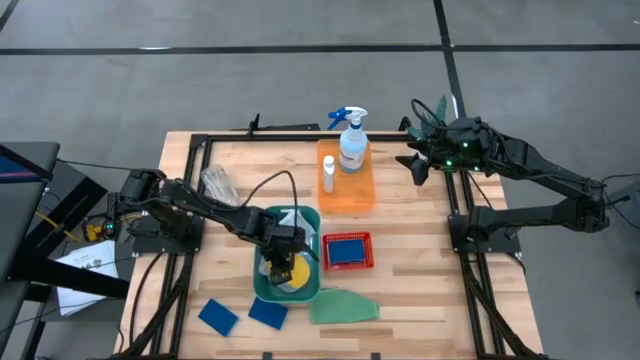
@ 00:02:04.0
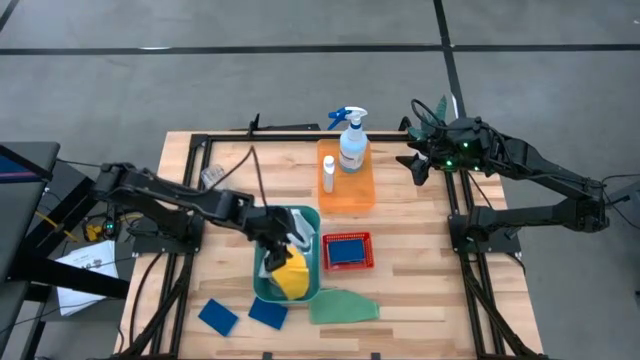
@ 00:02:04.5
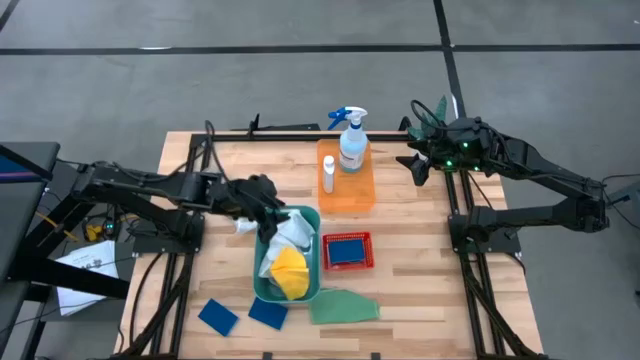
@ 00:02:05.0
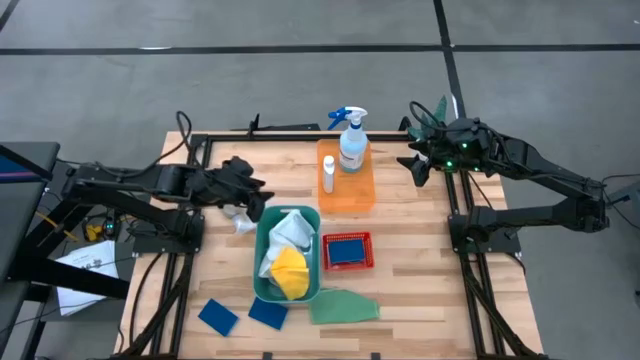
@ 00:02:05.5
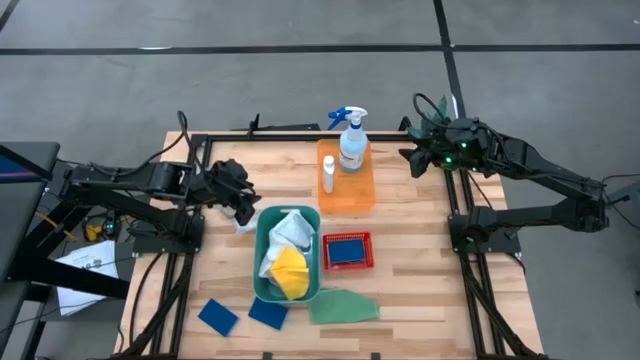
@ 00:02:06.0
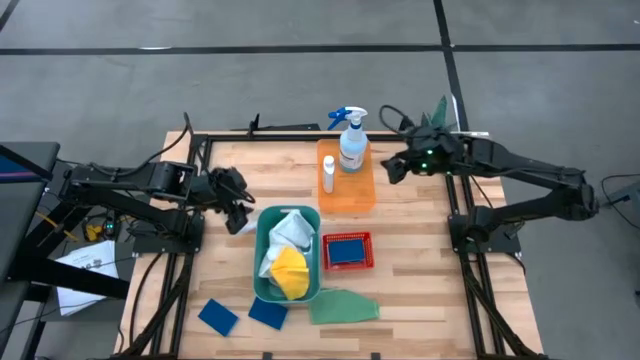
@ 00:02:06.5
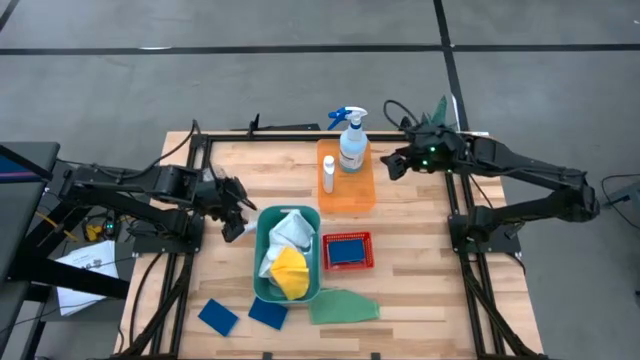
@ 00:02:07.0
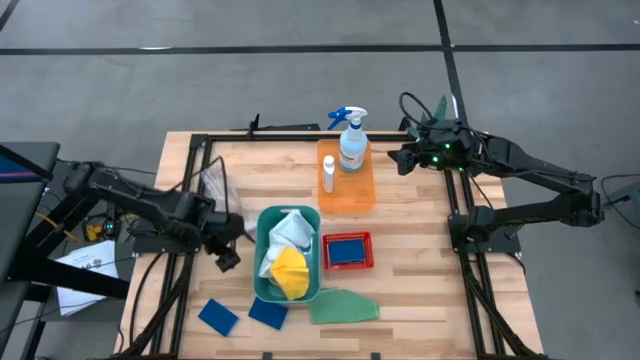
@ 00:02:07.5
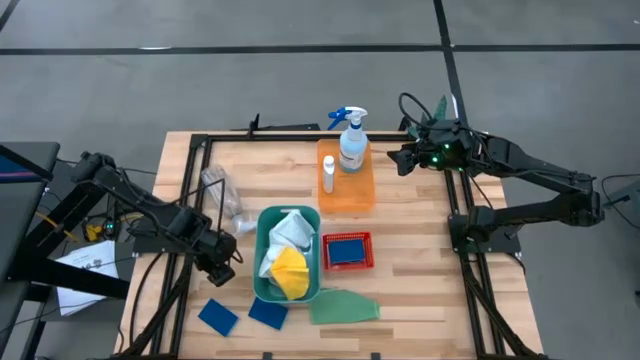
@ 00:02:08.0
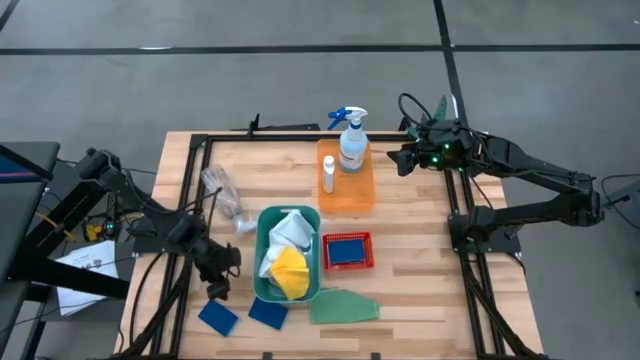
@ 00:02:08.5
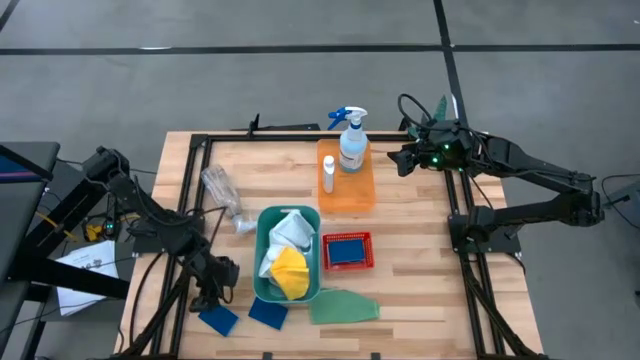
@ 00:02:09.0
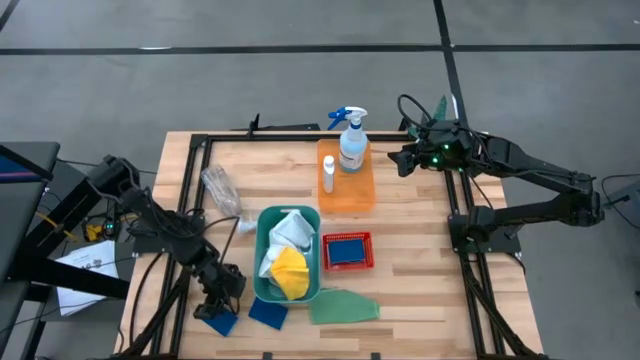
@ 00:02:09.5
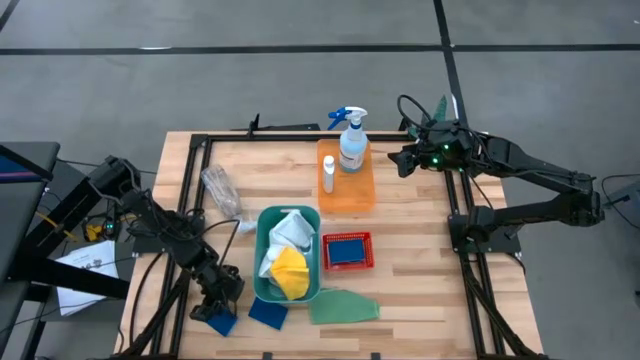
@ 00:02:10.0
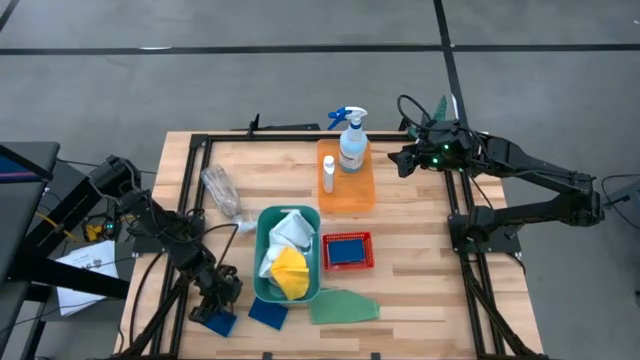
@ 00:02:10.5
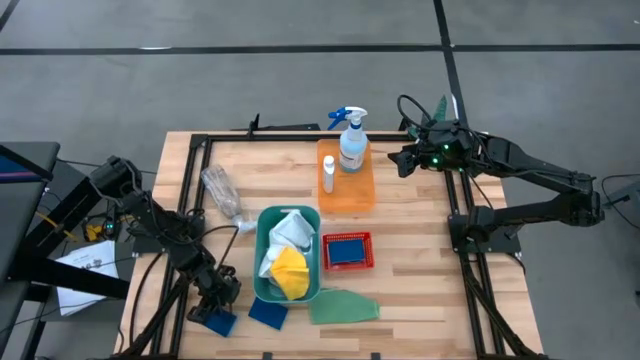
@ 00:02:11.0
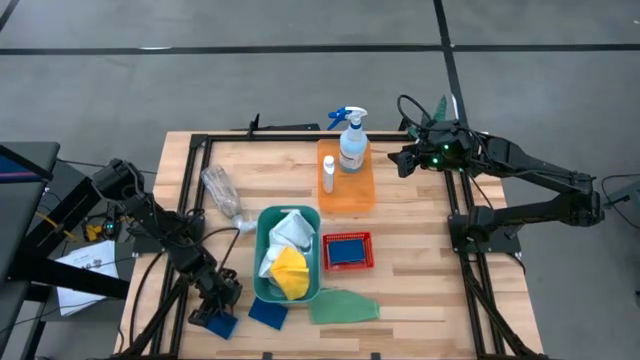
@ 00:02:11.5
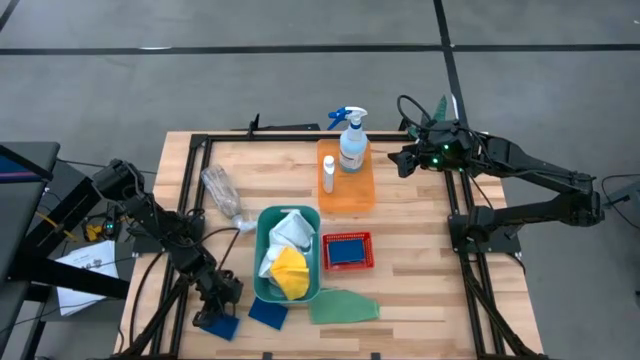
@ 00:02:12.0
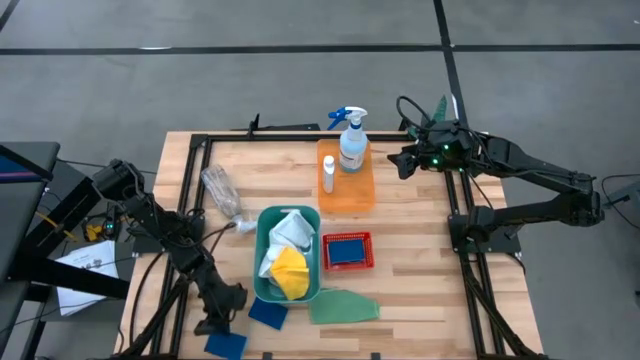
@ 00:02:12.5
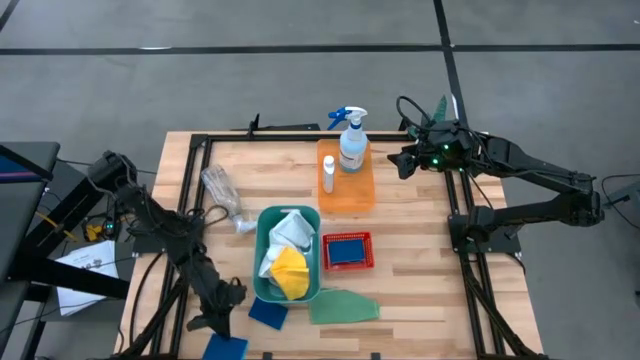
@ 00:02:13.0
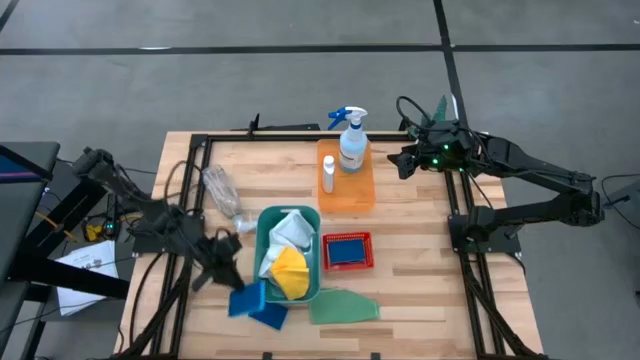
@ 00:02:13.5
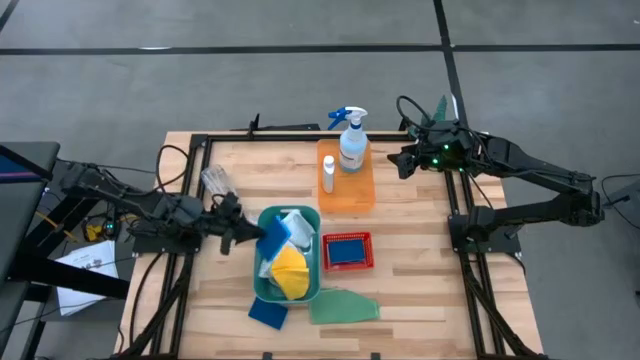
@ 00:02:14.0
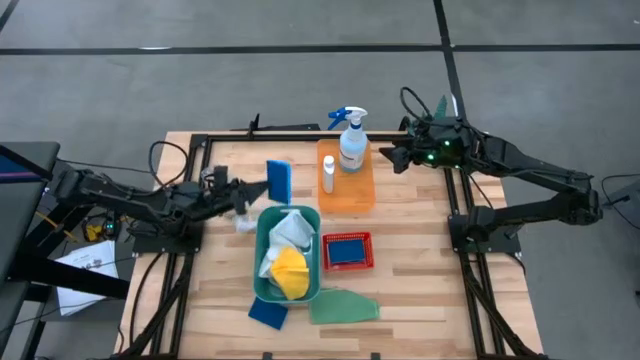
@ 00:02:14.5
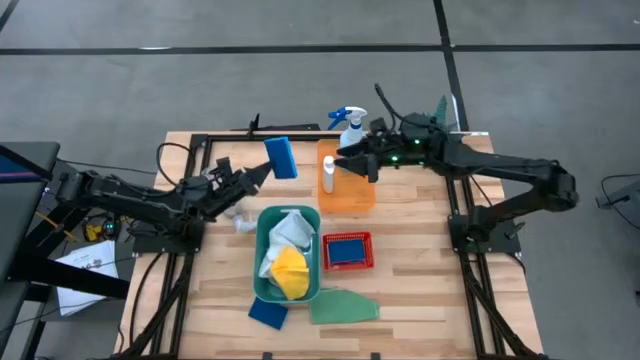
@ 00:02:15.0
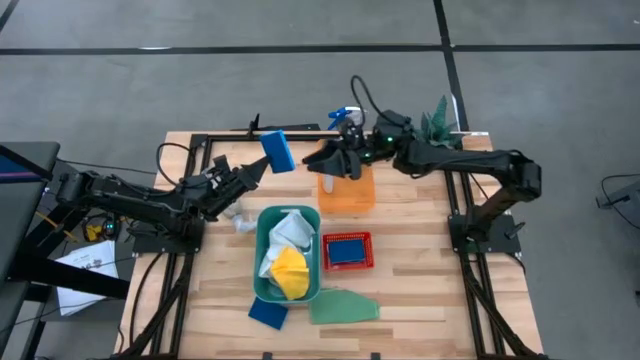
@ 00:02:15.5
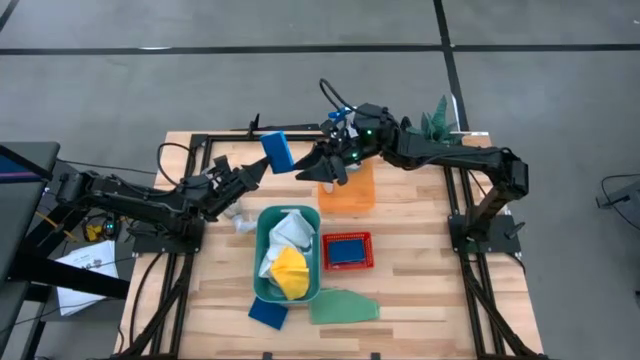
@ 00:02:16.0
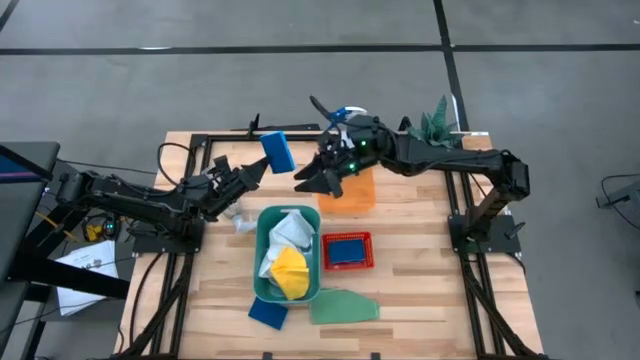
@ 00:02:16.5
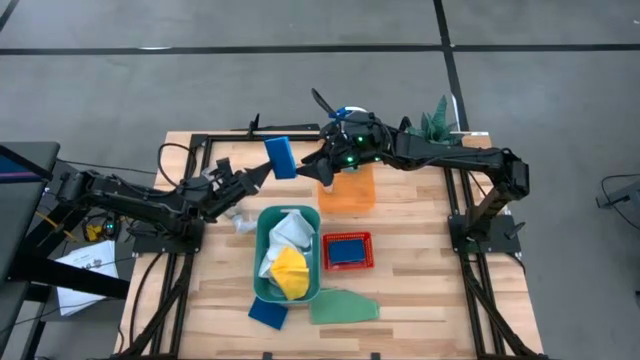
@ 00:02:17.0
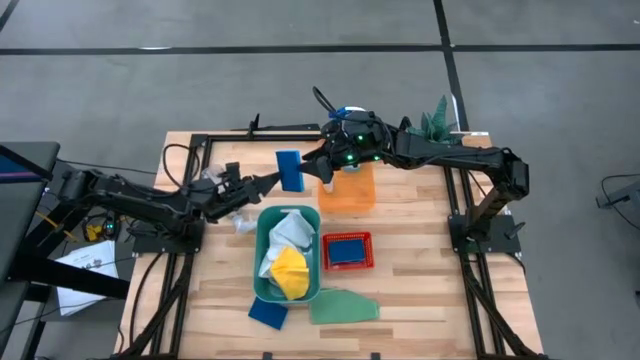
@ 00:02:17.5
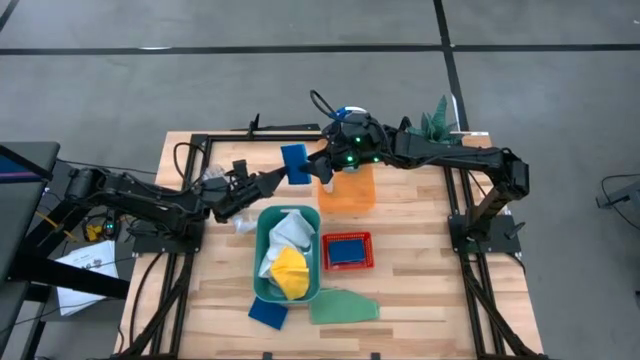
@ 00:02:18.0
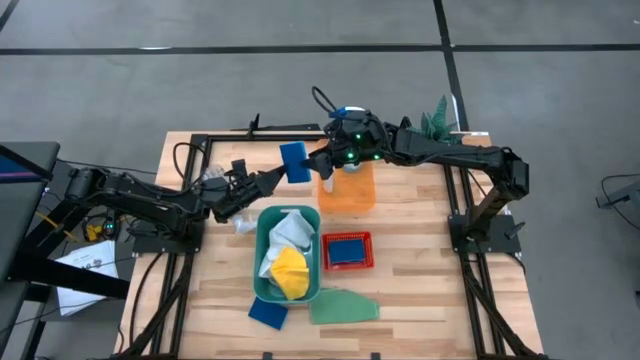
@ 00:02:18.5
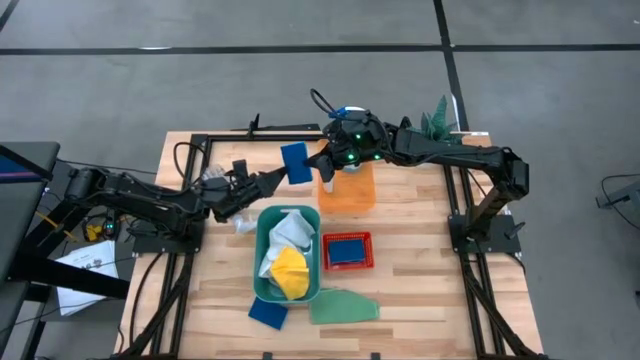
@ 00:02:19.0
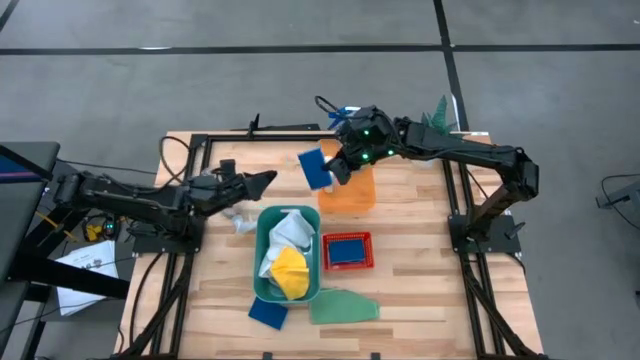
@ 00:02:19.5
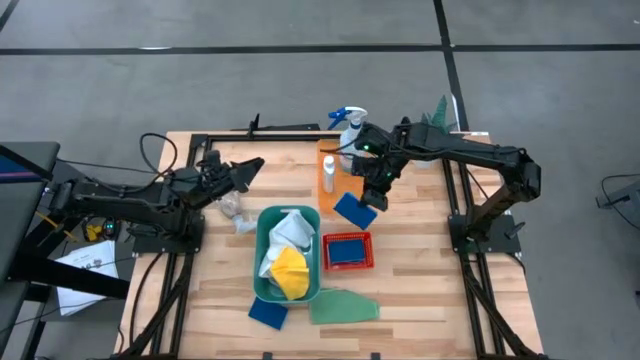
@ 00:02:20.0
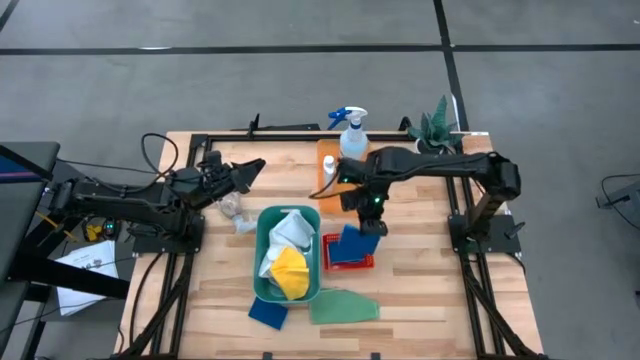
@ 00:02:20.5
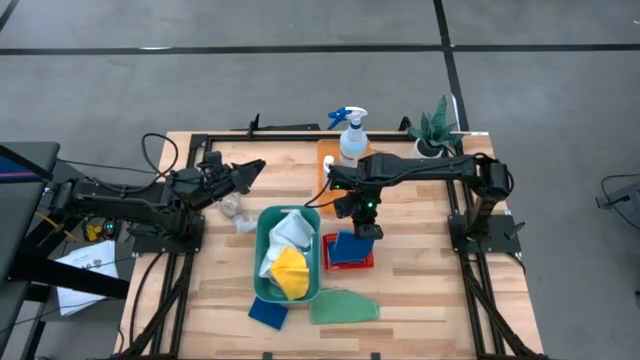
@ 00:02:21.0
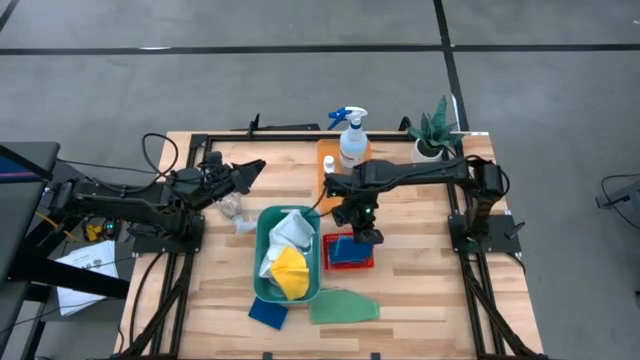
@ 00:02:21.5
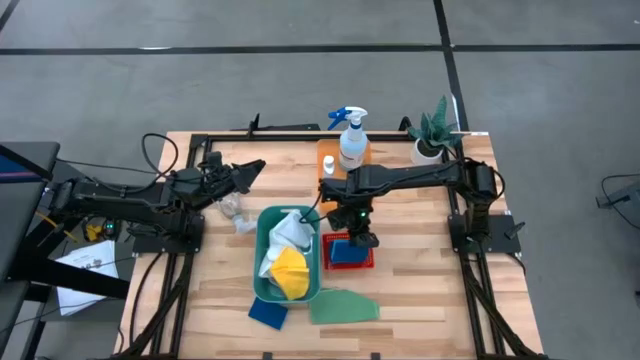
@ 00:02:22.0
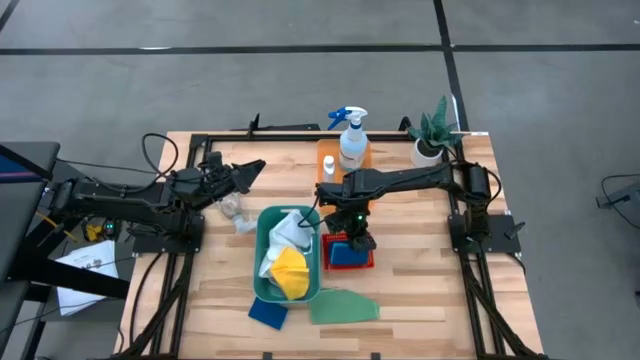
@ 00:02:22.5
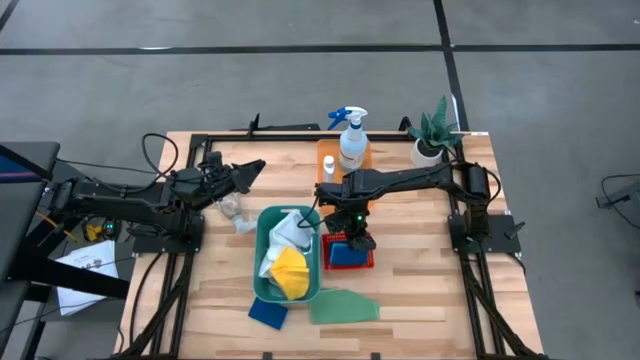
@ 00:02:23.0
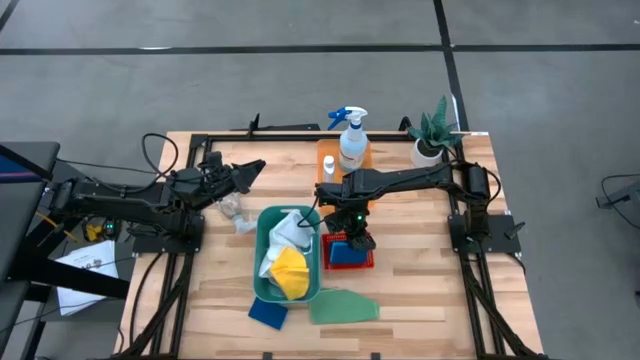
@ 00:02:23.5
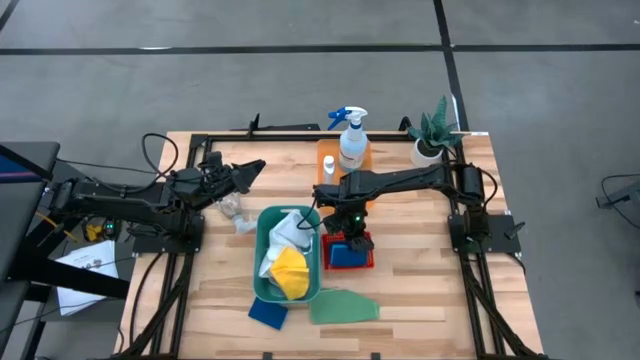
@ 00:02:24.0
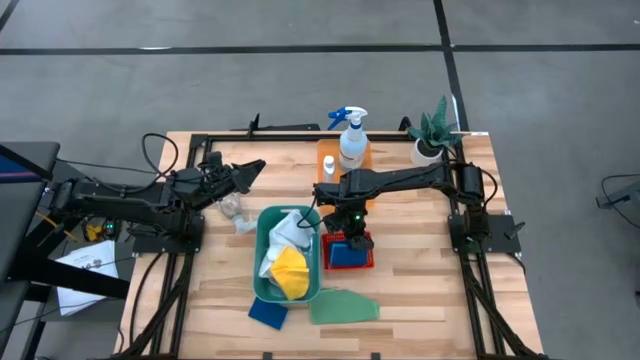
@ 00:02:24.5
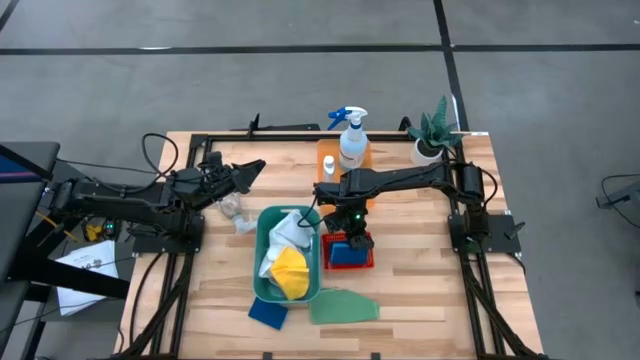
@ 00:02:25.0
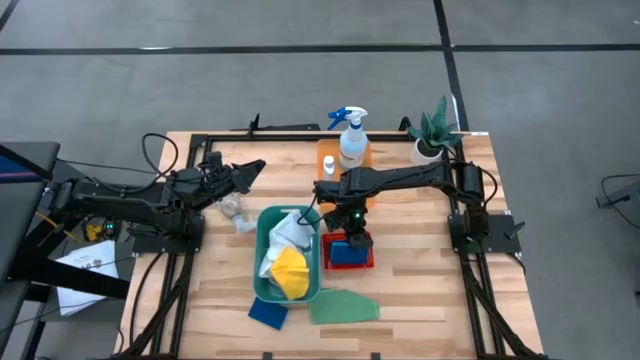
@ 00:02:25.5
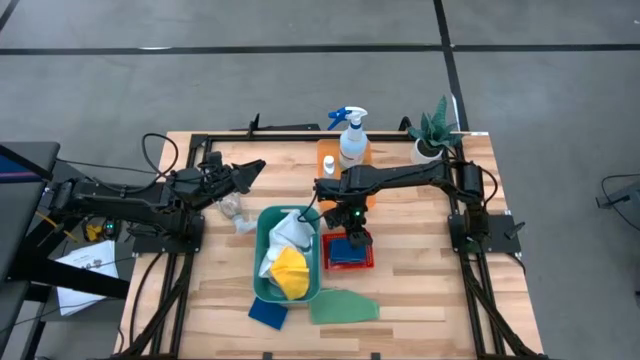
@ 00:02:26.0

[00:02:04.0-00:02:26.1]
Task: Pick & Place Kitchen Items
Put the blue sponge into the red bin
